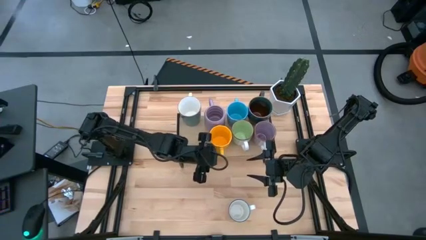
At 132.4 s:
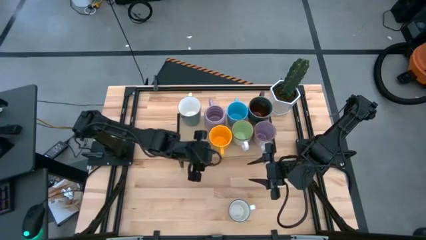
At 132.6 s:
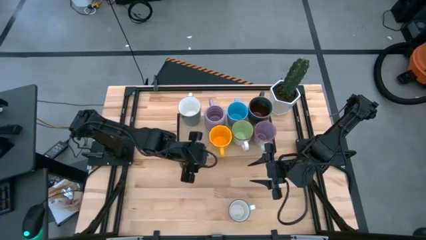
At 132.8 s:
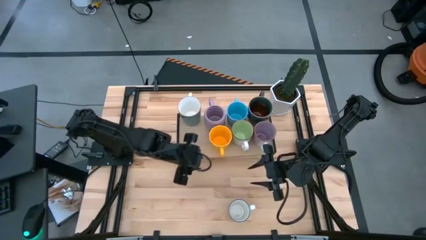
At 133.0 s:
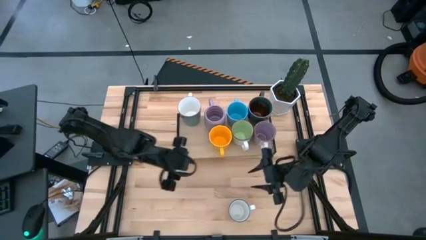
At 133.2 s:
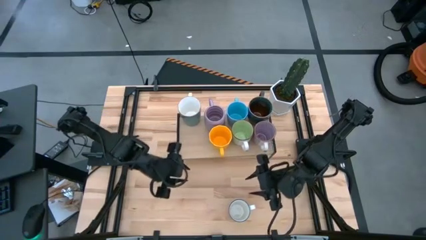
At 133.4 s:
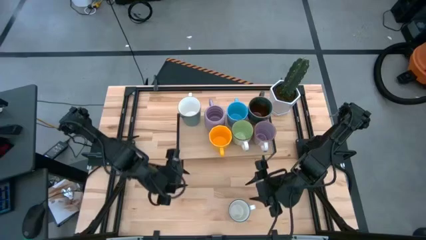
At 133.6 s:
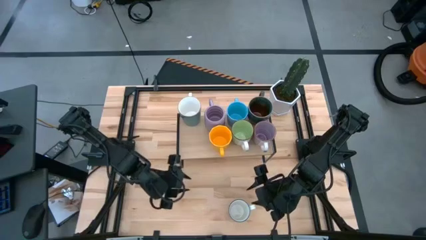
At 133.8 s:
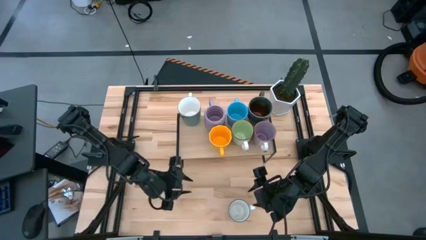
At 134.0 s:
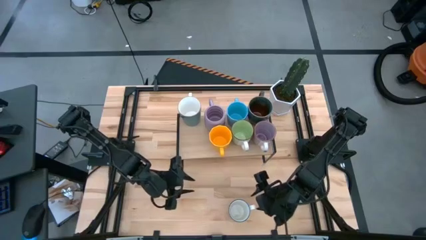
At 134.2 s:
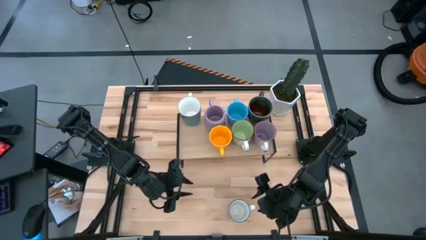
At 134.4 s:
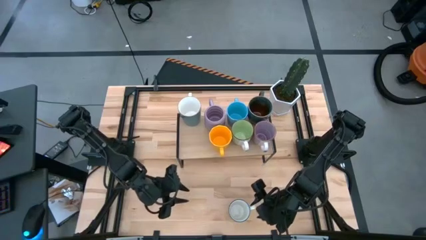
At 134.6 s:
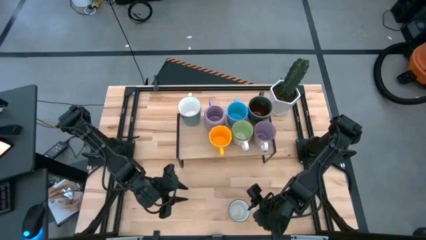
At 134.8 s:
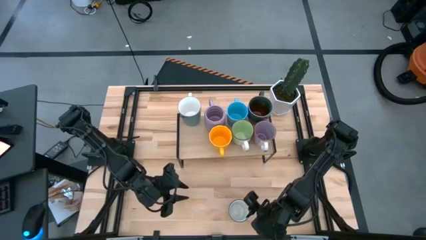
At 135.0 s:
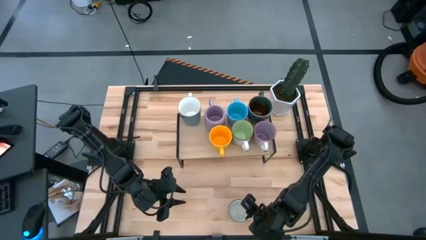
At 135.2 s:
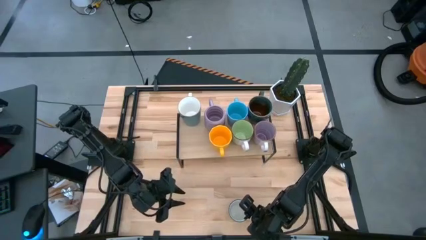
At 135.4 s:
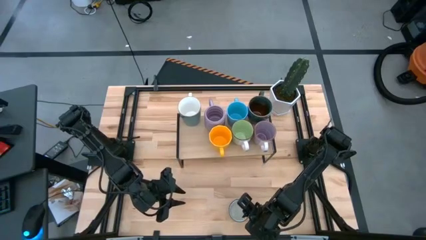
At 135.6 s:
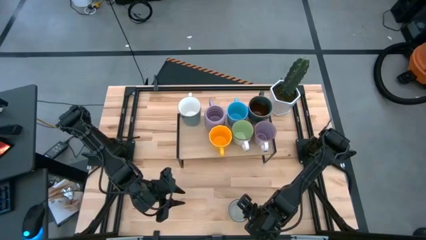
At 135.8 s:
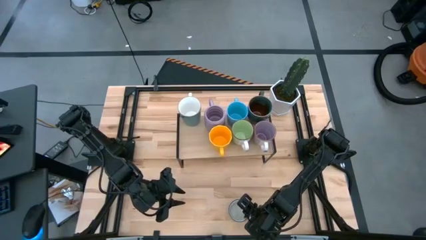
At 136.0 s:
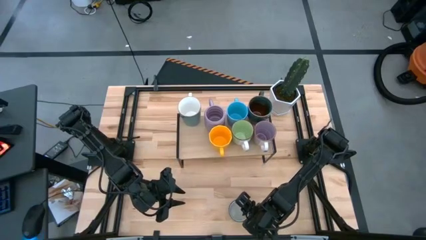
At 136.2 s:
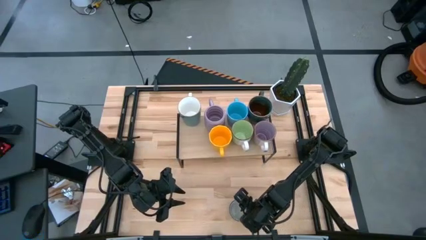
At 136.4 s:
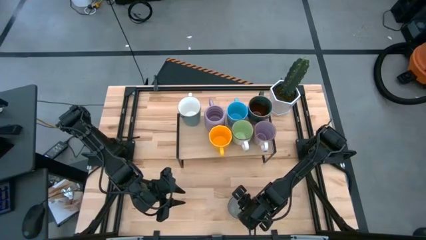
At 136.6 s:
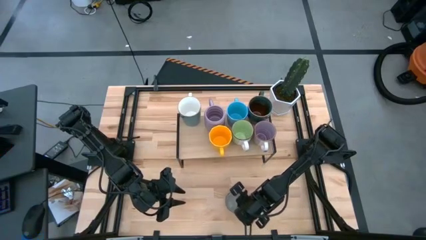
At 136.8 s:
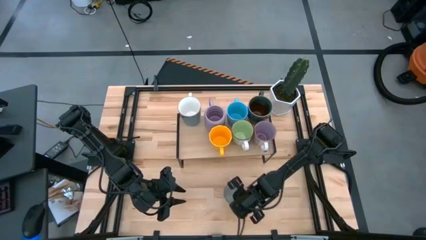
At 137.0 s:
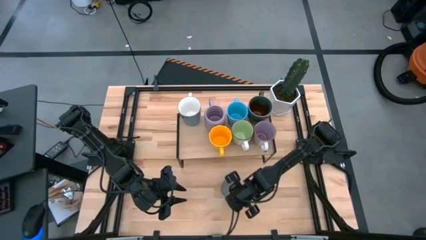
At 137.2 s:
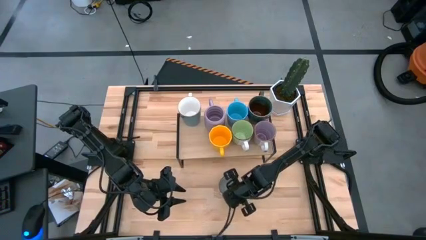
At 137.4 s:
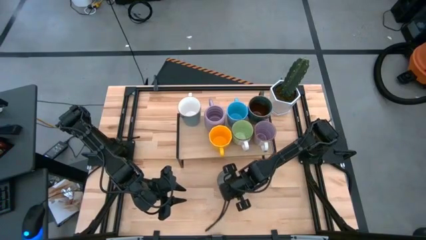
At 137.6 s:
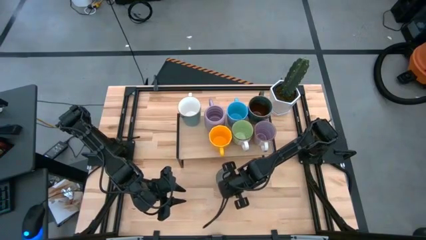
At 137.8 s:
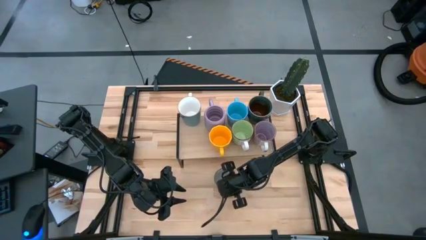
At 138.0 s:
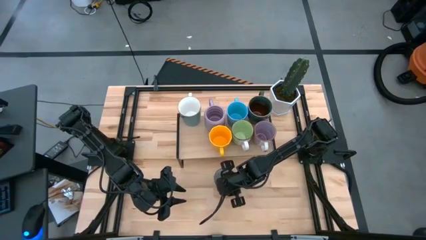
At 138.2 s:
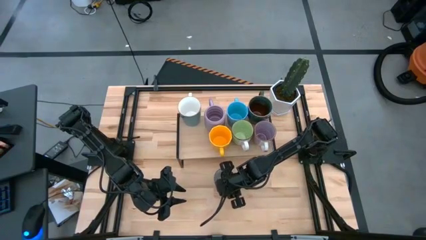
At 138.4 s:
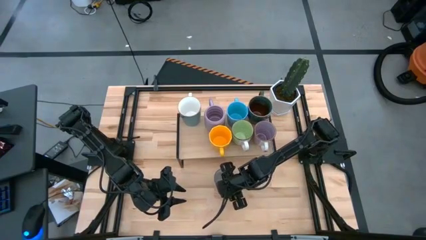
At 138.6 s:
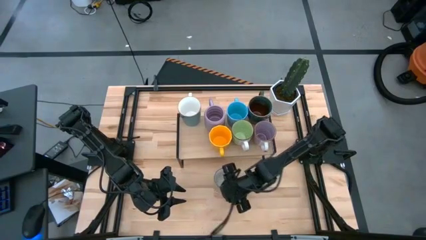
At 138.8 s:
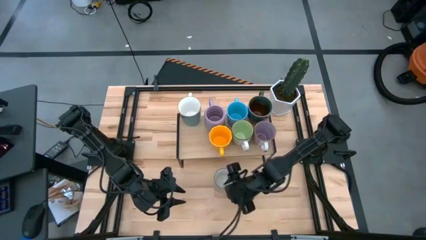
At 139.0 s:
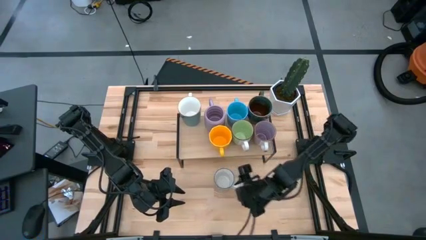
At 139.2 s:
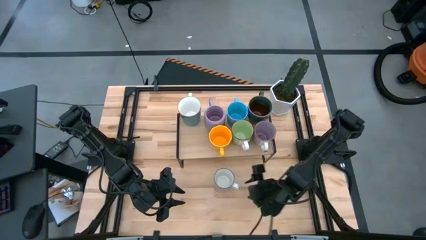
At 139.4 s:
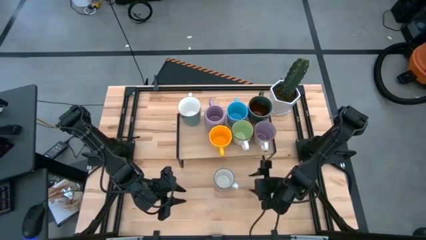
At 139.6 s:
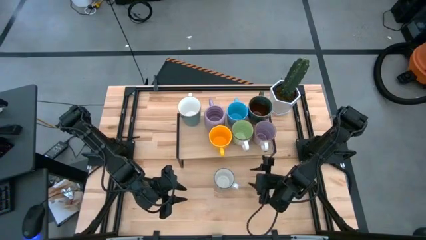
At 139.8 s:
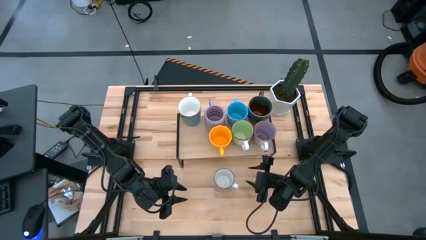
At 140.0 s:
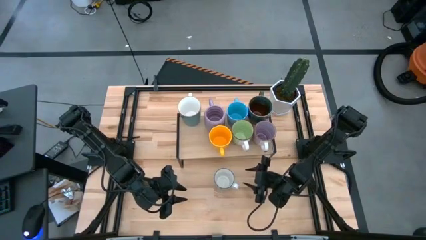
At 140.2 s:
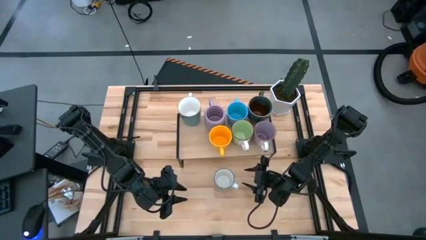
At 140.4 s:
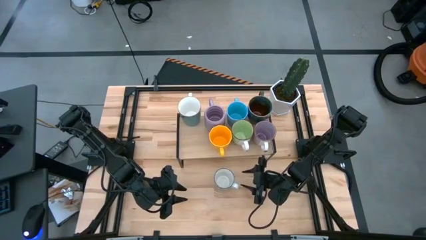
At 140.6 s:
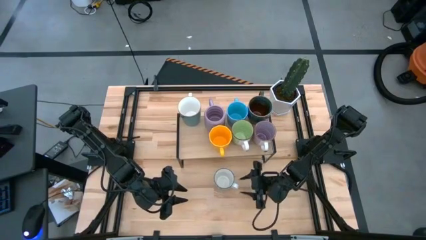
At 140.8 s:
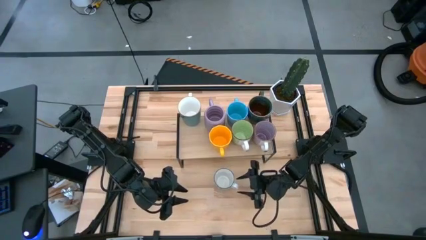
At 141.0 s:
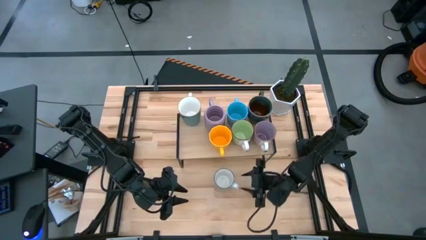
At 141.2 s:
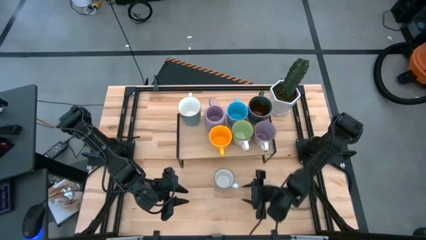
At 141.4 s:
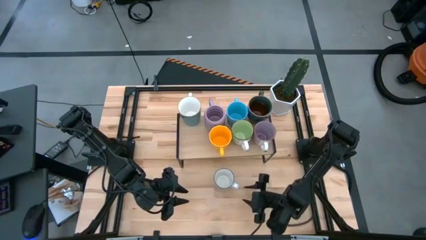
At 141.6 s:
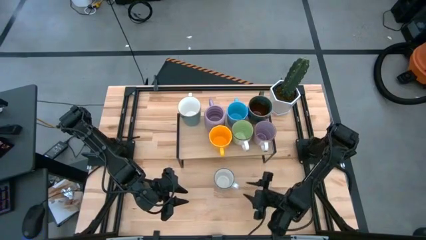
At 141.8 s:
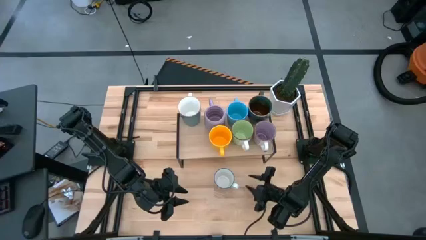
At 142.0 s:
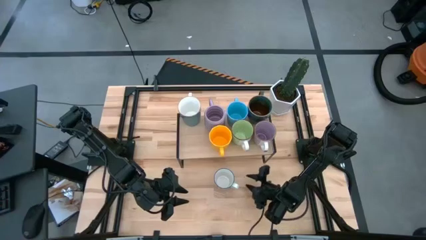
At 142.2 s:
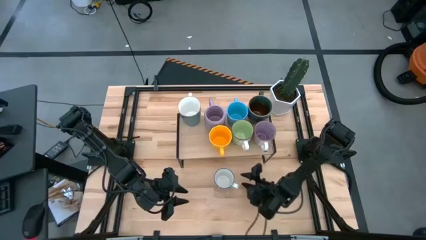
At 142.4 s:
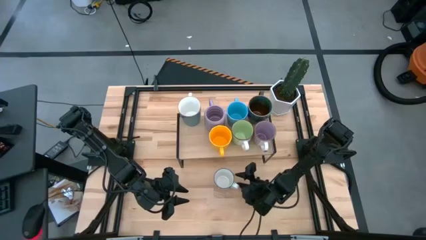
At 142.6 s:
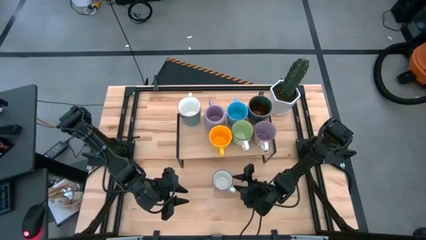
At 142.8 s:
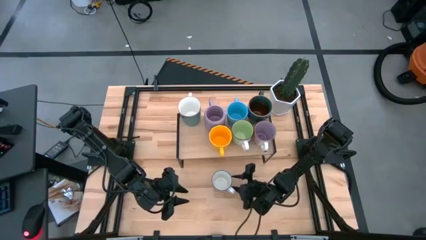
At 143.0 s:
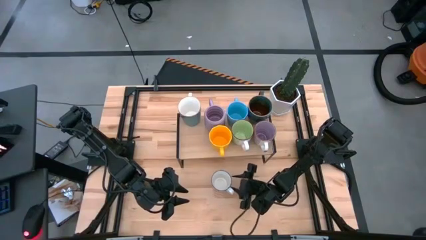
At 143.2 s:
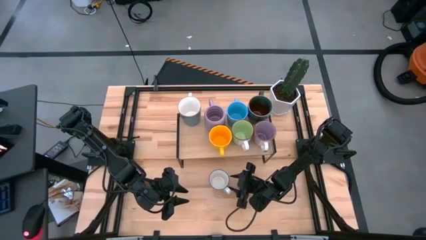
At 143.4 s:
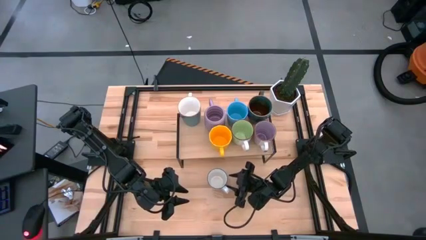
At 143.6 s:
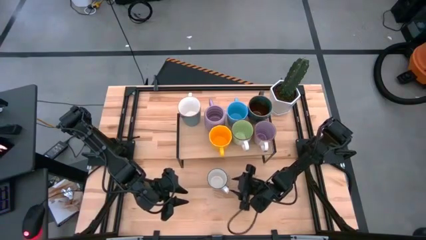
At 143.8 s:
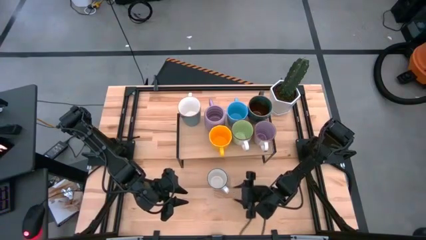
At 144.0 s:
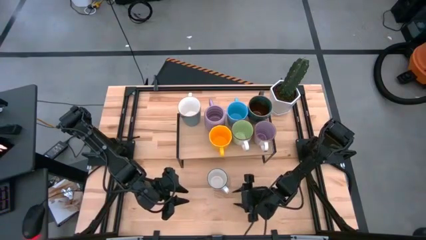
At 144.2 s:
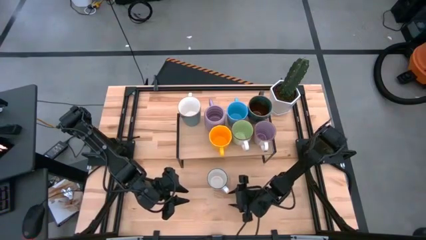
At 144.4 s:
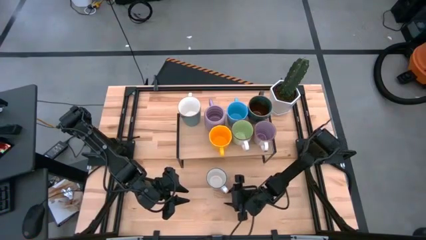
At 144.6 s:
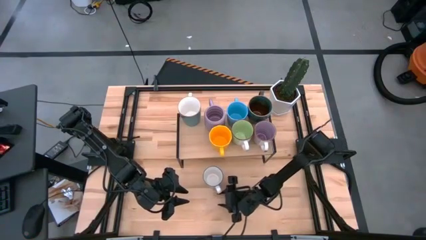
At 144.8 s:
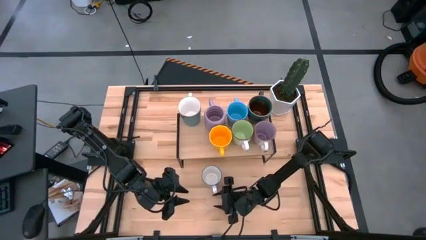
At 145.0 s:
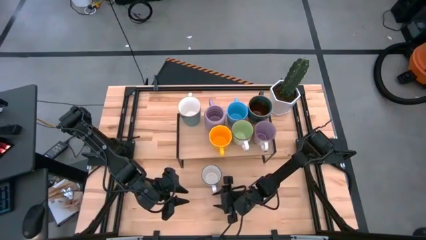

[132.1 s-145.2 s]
Task: Place coffee mugs
Put the white mug on the shelf
